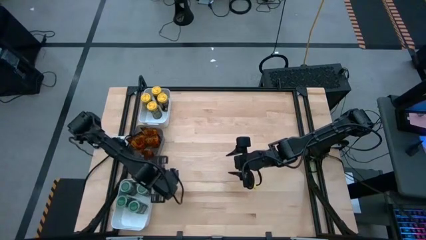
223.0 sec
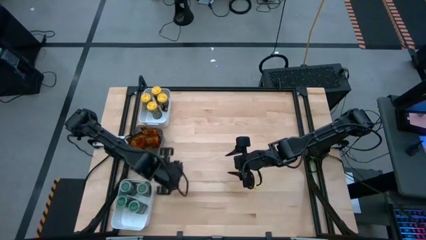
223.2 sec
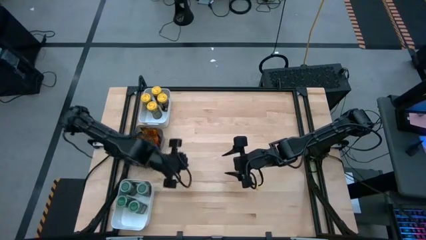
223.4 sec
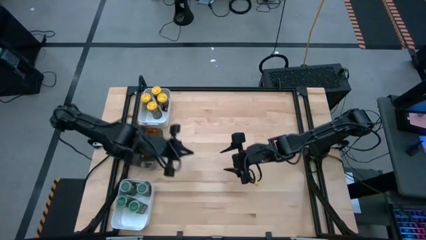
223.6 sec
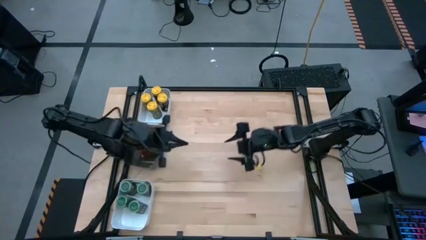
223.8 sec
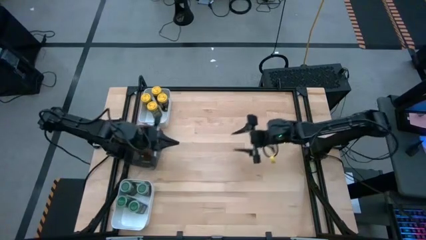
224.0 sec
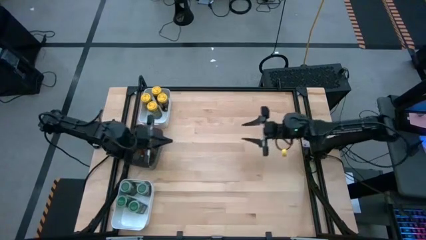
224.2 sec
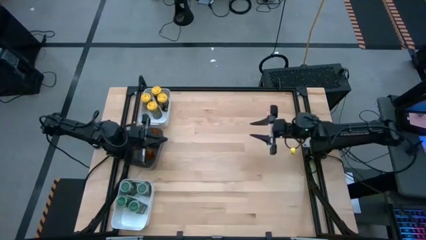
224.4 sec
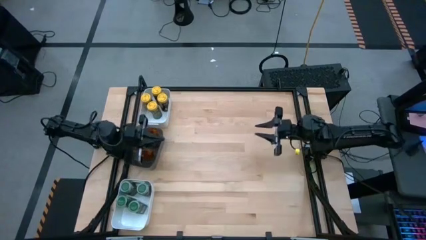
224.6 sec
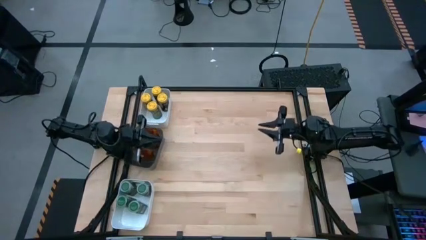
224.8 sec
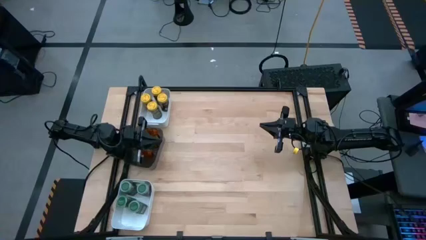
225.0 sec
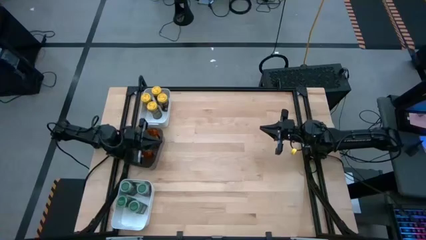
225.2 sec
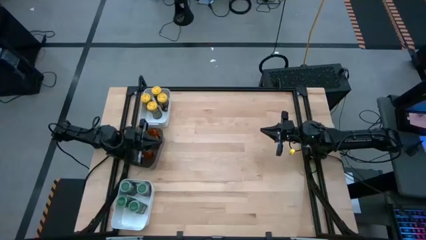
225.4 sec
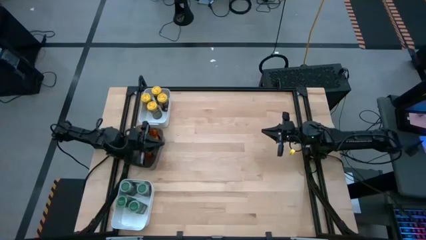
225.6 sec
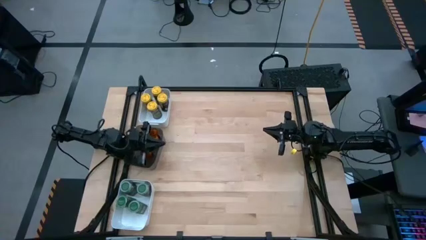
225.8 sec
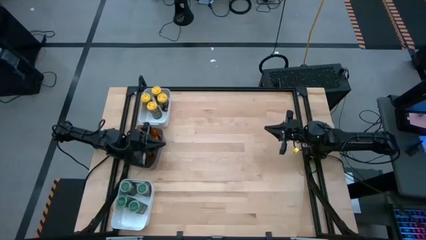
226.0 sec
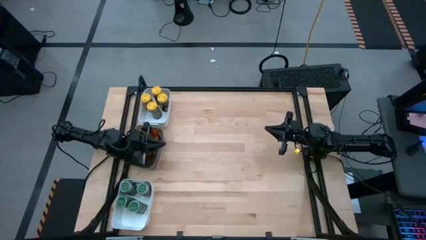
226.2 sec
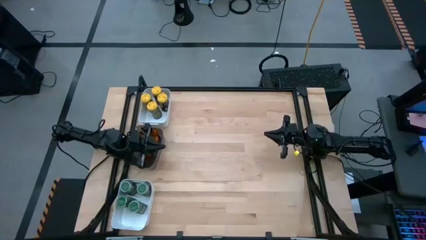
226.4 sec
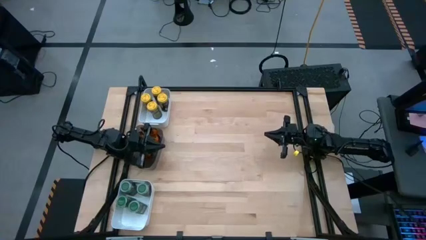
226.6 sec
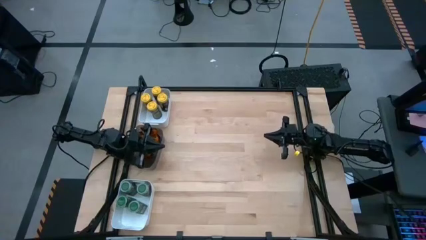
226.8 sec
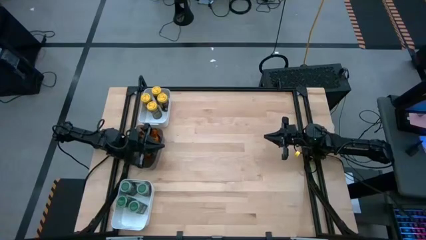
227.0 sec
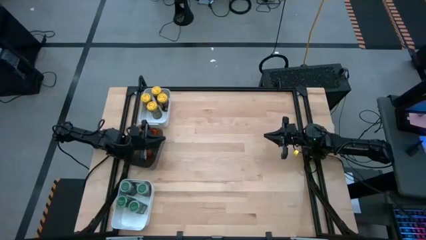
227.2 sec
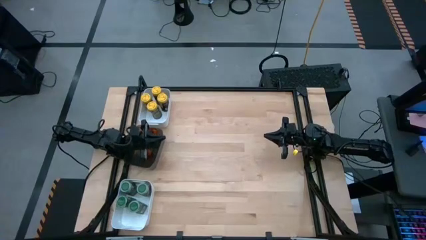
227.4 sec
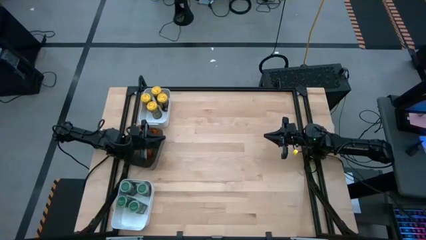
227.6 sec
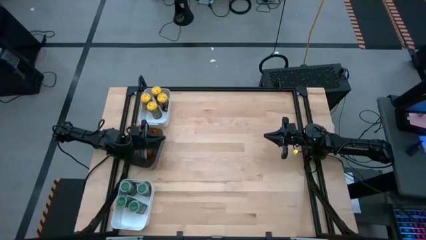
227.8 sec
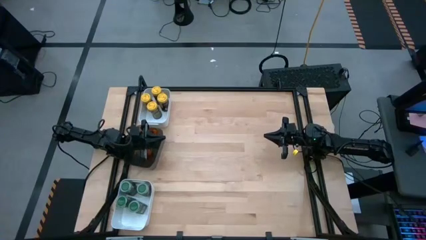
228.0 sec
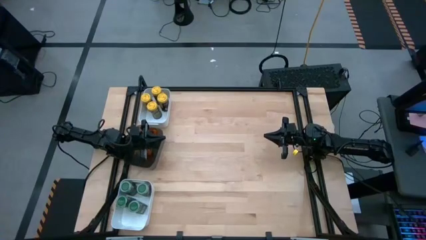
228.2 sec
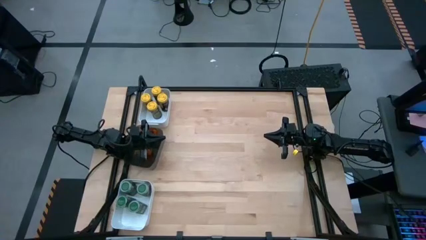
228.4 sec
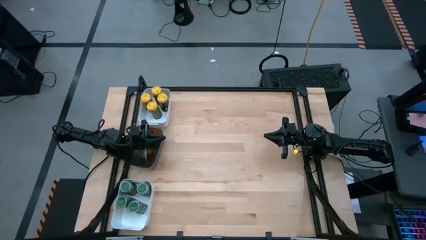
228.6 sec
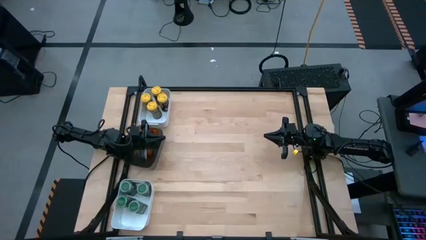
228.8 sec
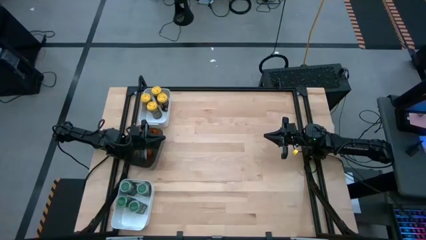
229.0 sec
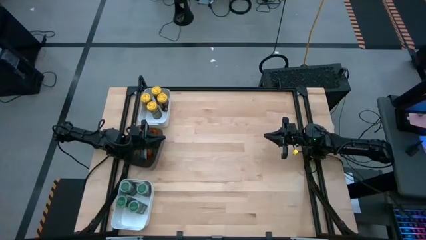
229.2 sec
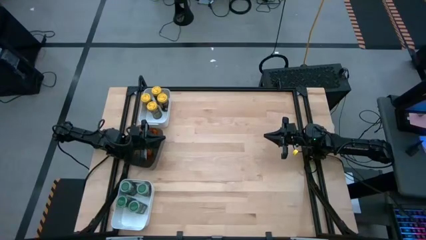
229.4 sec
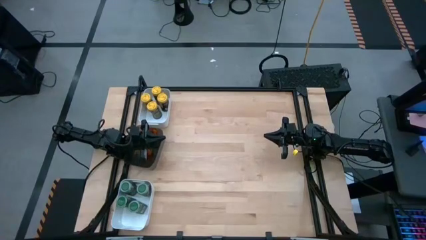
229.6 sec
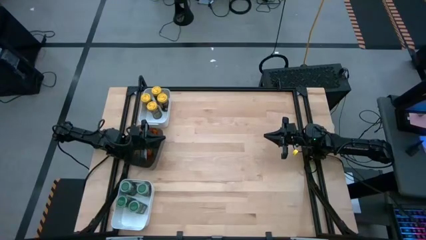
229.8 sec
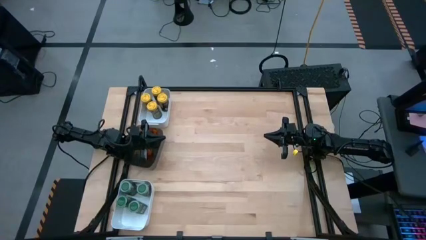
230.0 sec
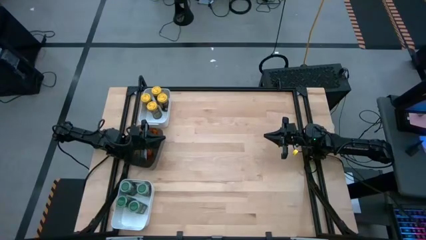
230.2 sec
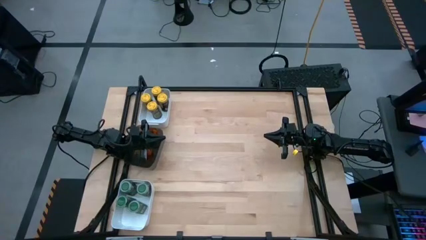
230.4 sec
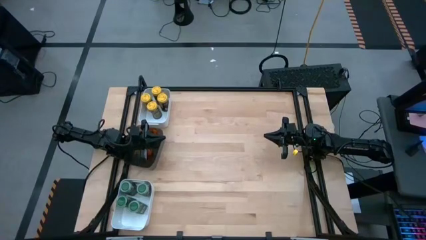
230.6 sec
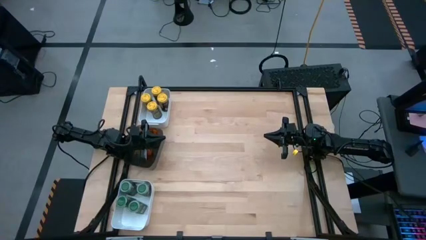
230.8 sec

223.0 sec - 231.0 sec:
Task: Sort spices by type
Return to Home Position

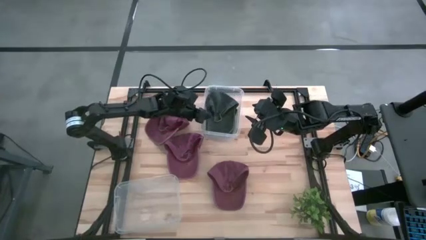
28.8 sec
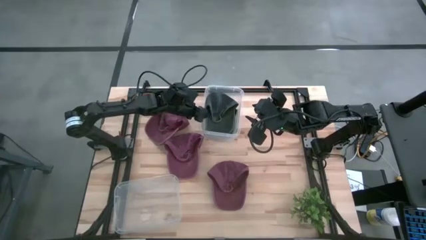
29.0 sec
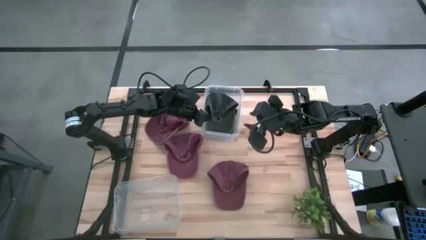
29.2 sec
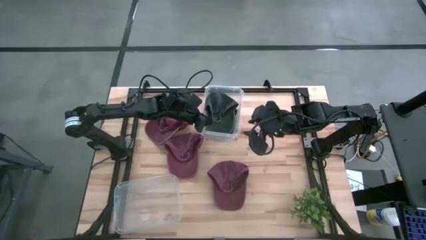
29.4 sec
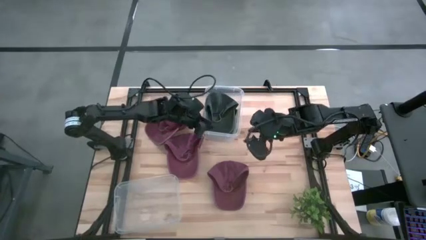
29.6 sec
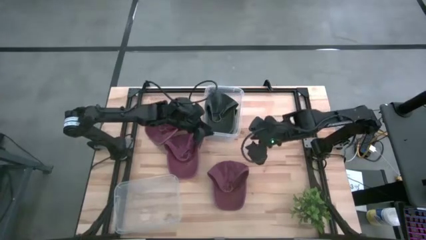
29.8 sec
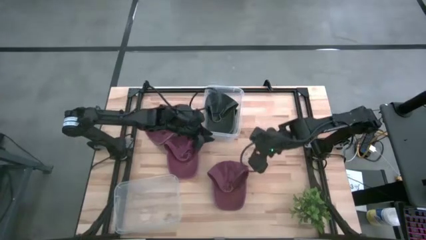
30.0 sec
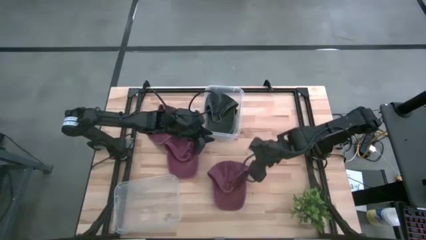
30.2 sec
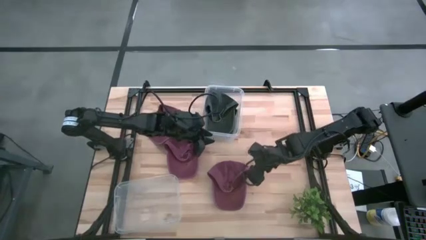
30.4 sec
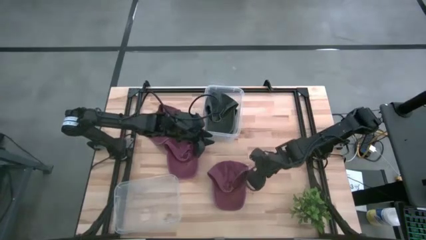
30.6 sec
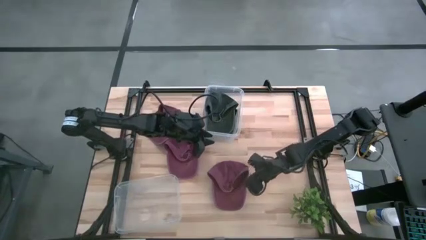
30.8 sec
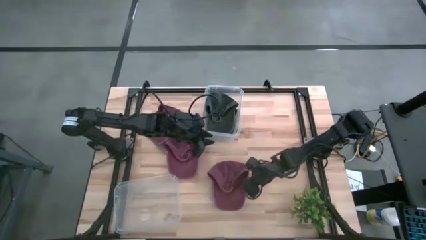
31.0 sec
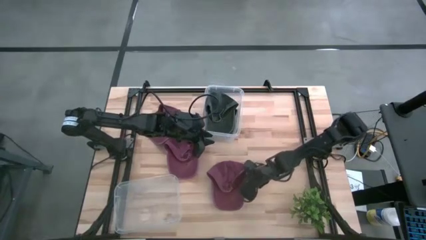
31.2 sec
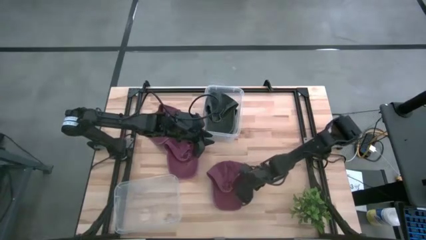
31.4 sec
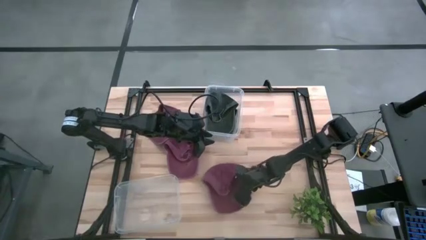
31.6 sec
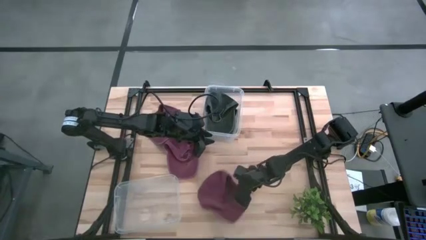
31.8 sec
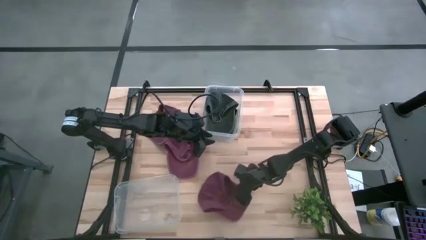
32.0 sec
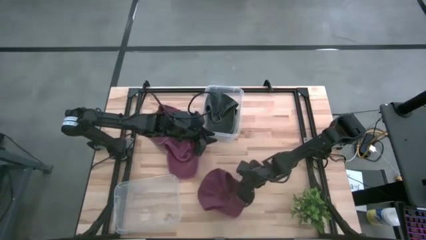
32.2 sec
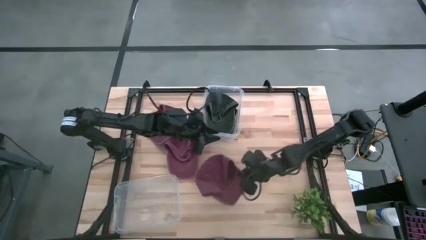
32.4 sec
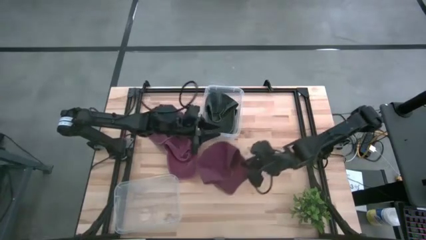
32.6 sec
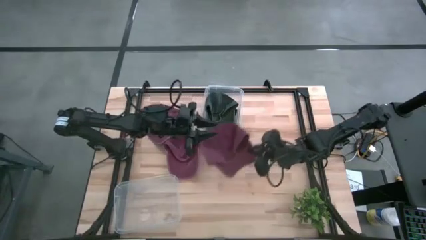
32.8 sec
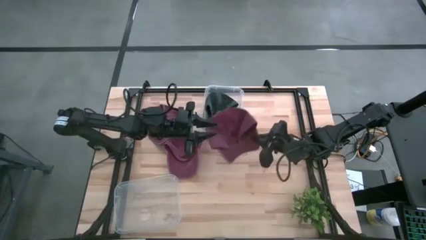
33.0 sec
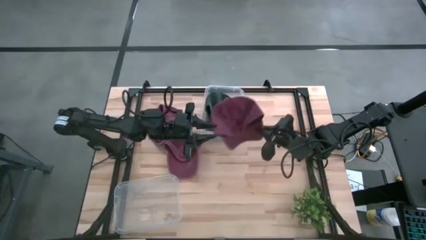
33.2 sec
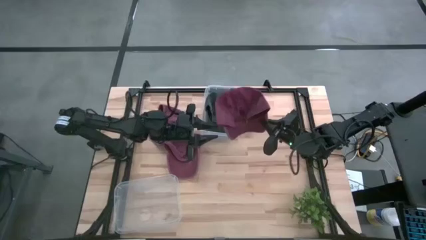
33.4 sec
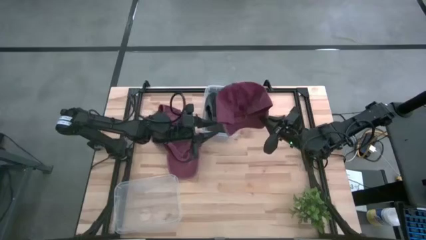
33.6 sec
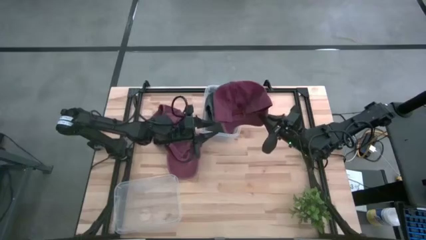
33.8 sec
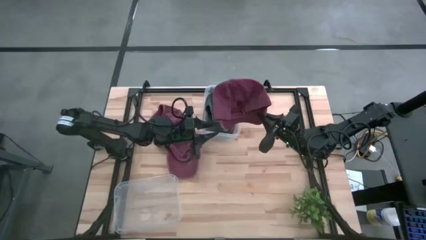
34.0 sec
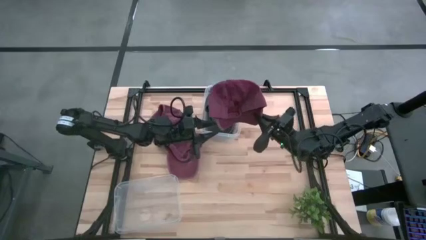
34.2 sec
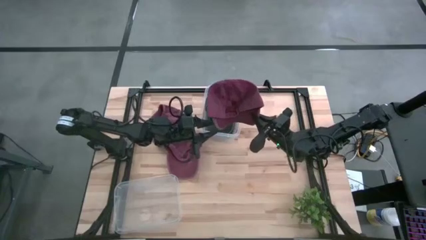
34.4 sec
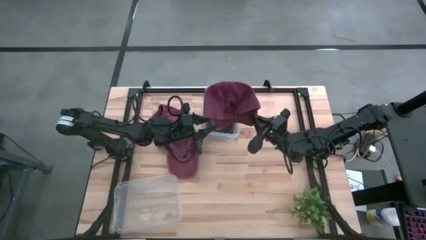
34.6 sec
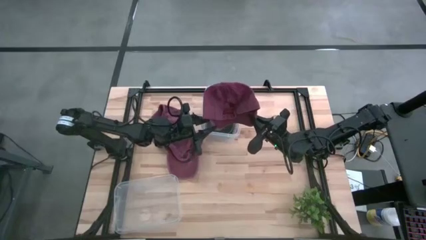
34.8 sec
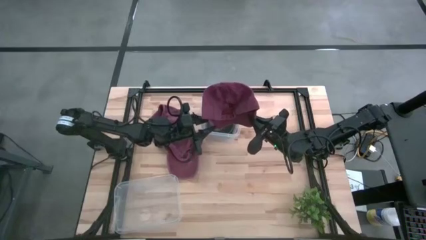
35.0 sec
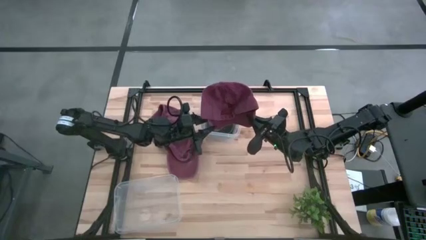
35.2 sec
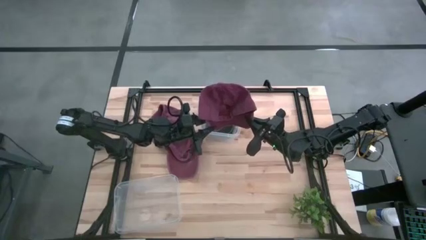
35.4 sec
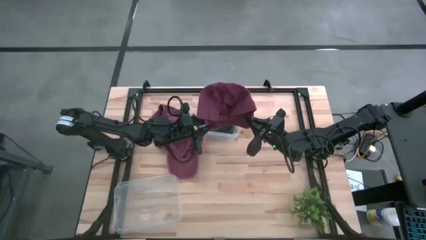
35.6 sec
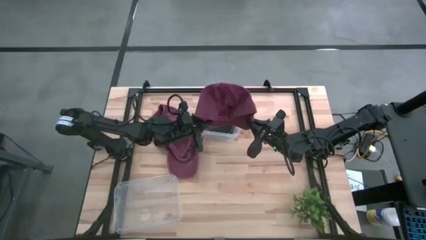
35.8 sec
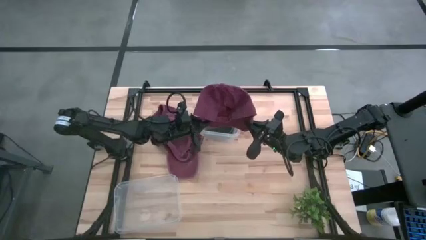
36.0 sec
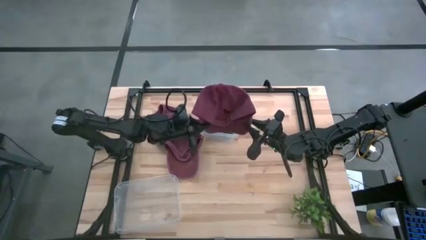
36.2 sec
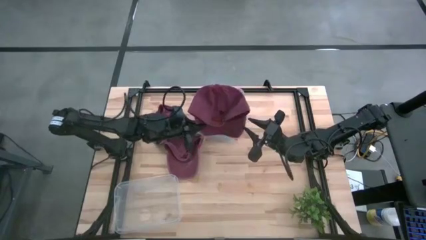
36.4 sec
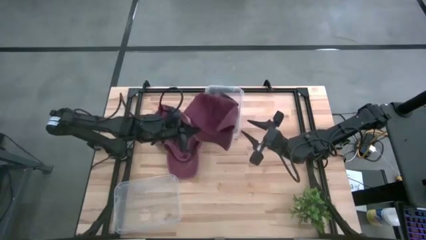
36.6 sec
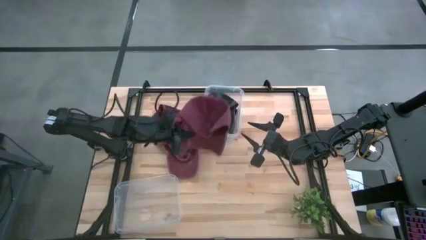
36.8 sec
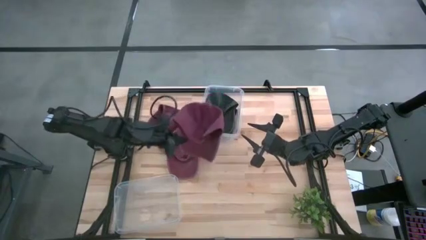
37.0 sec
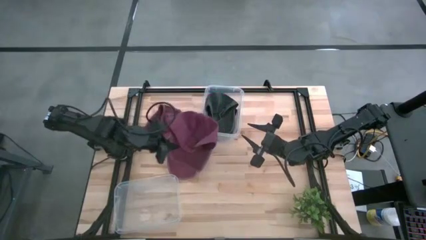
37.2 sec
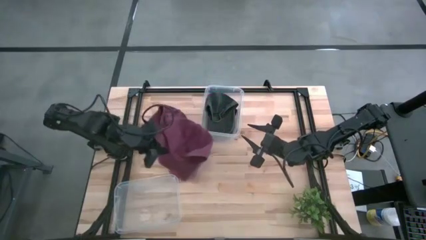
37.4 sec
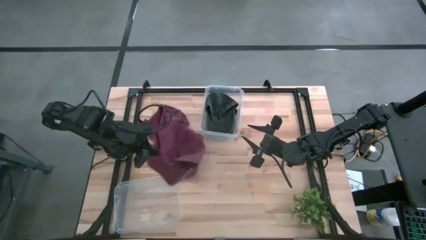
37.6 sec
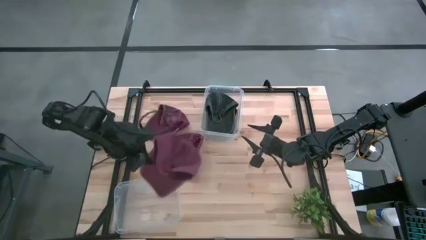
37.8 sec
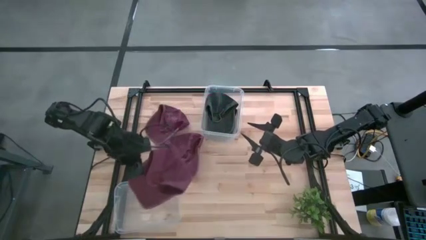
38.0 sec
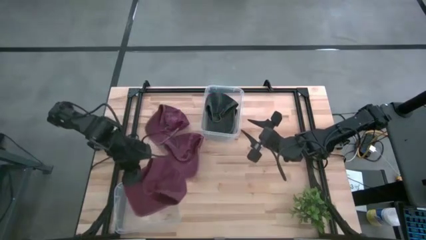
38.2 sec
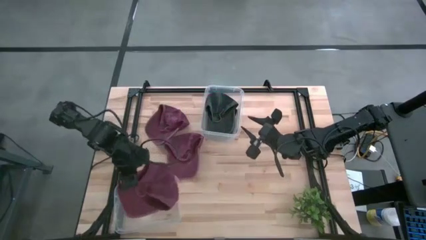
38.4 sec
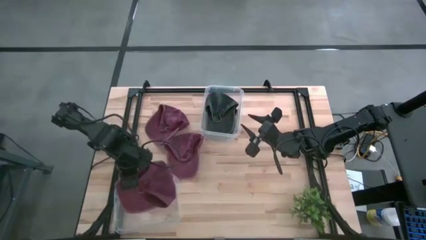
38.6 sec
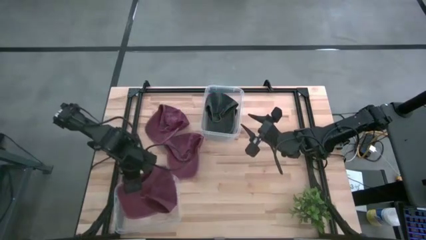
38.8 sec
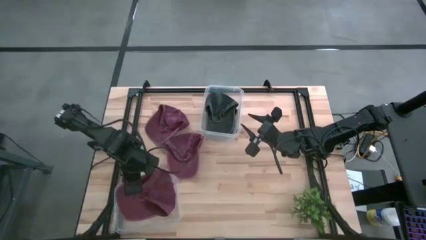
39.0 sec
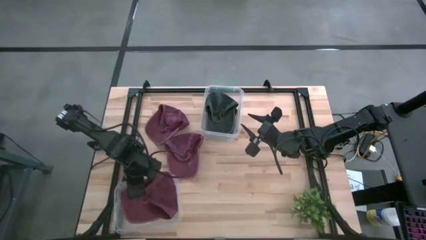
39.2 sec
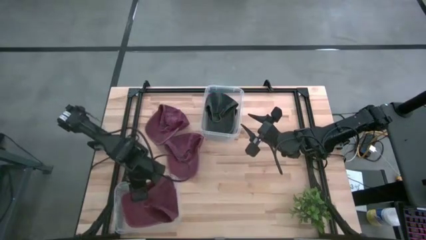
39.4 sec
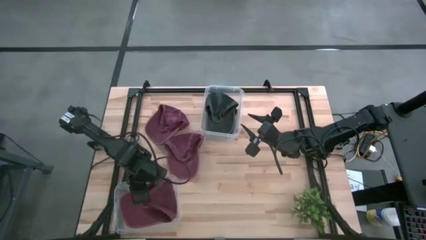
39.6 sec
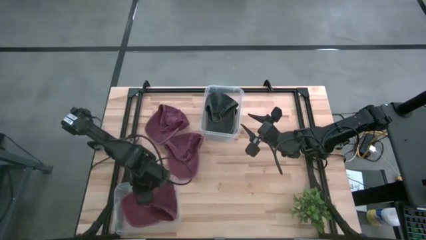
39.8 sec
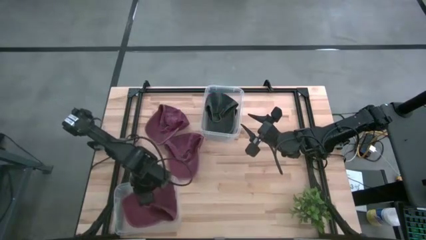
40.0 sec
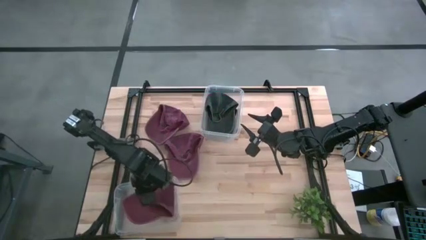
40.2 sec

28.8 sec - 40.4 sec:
Task: Pick and place caps into container
Put the bottom red cap into the bottom transparent container
